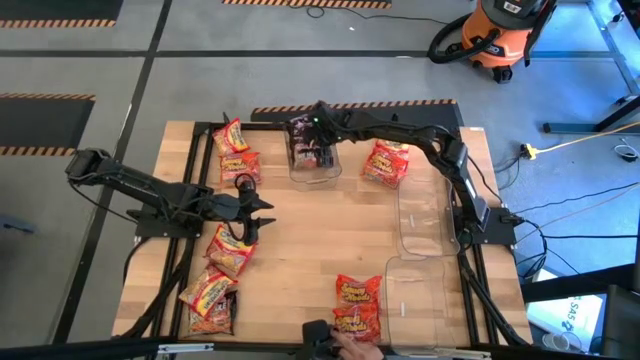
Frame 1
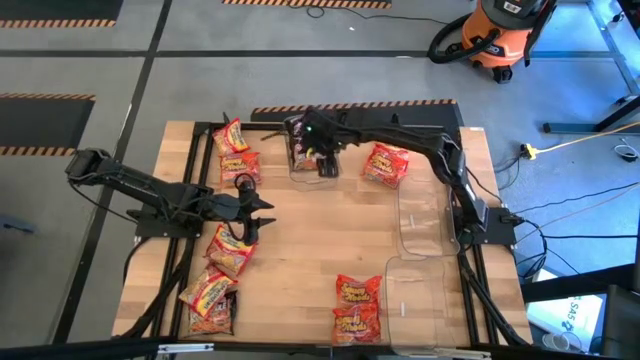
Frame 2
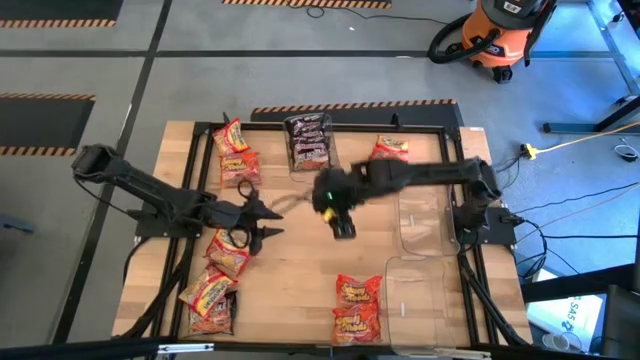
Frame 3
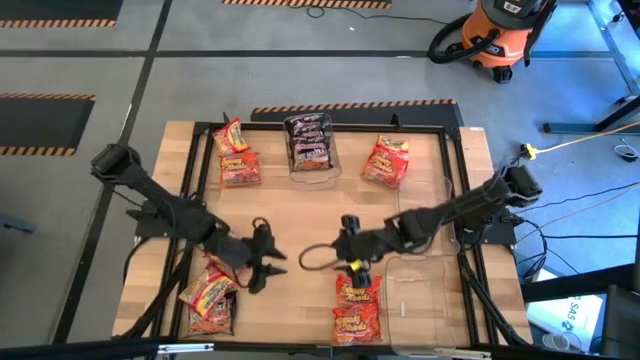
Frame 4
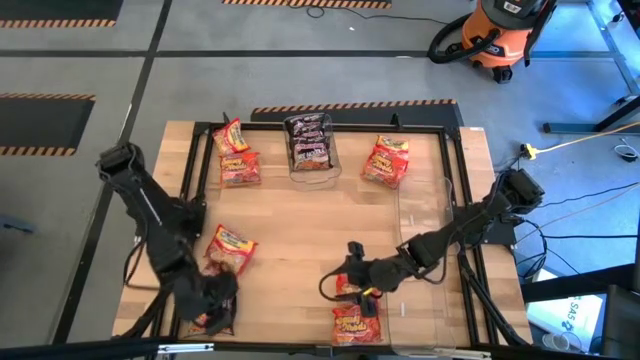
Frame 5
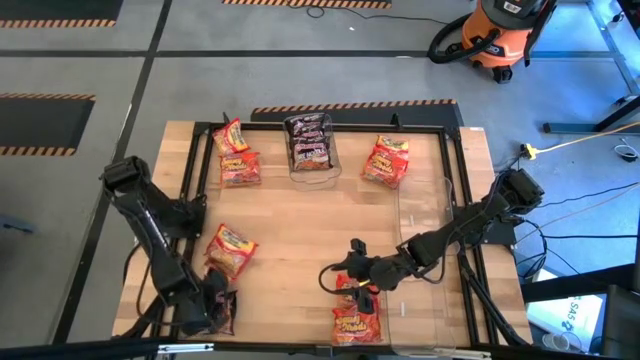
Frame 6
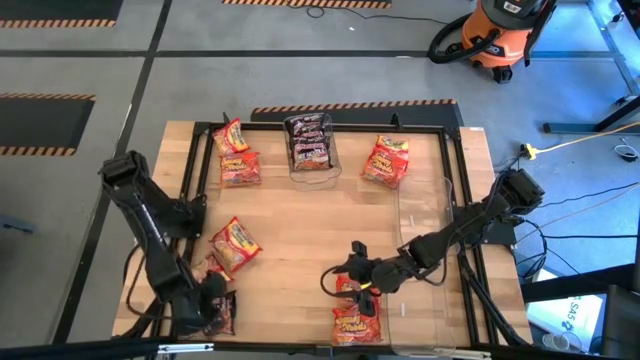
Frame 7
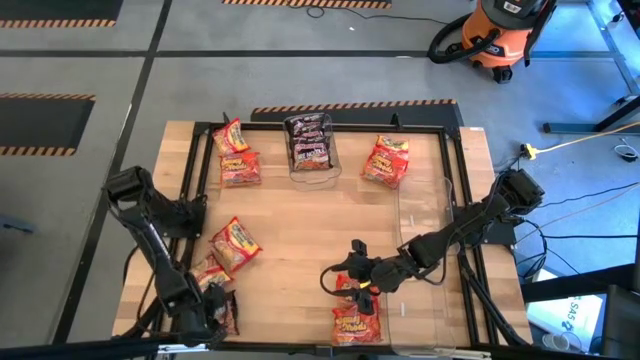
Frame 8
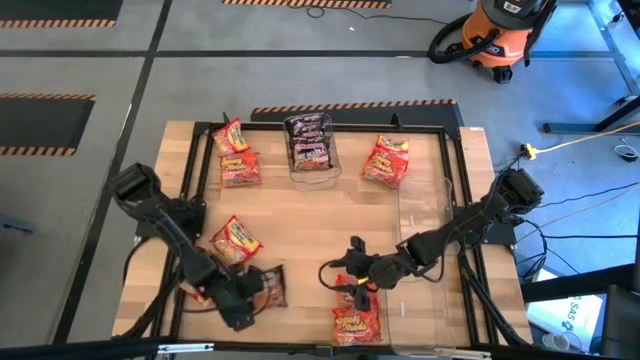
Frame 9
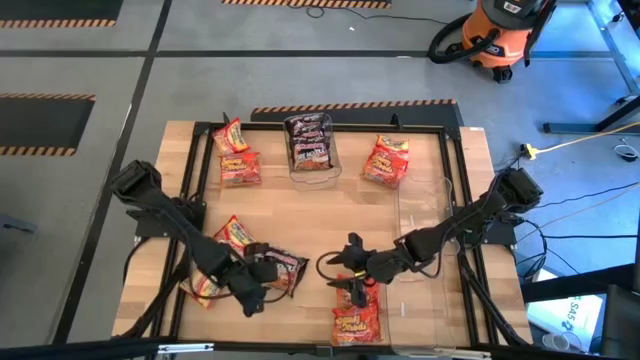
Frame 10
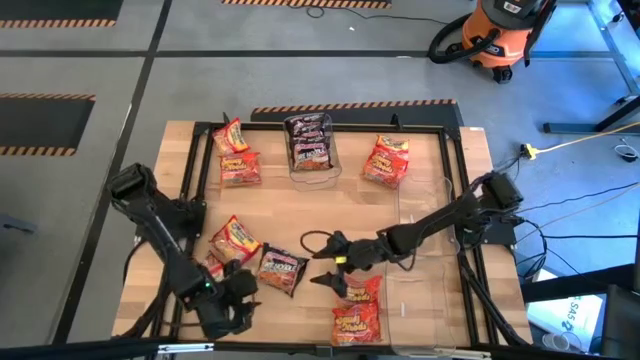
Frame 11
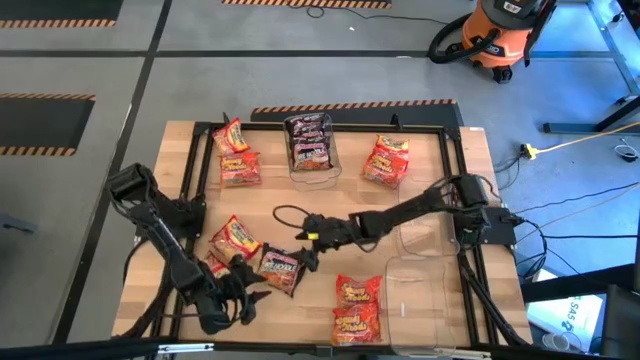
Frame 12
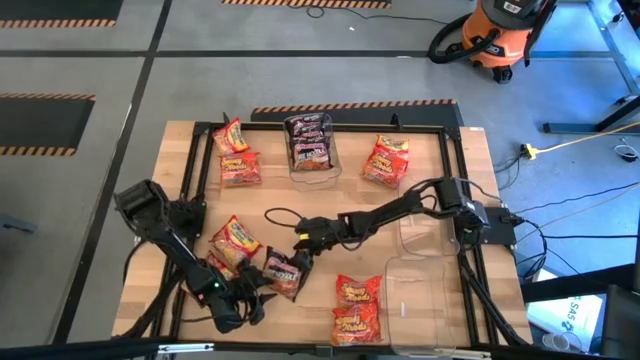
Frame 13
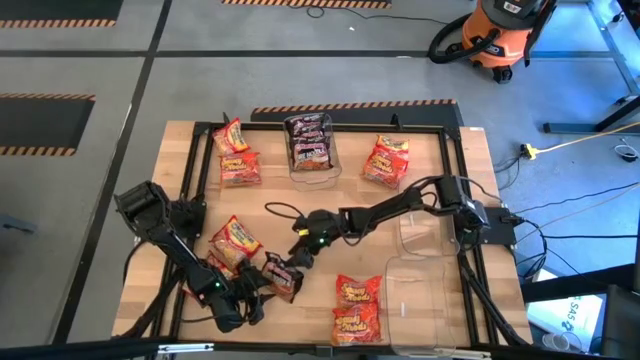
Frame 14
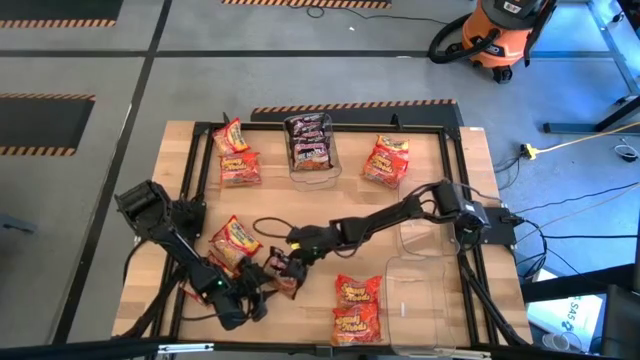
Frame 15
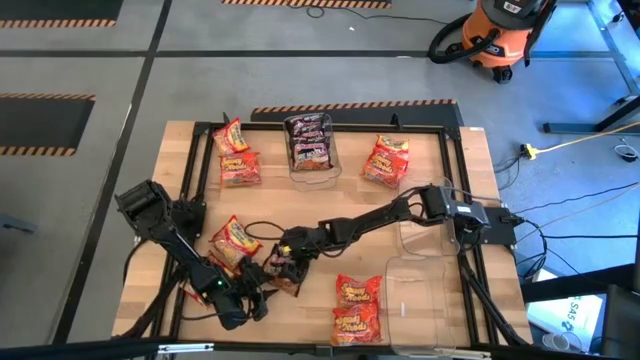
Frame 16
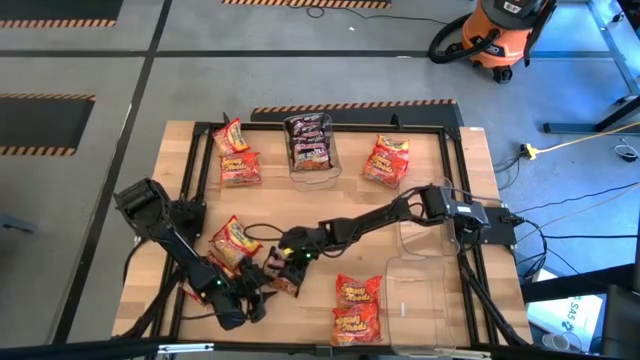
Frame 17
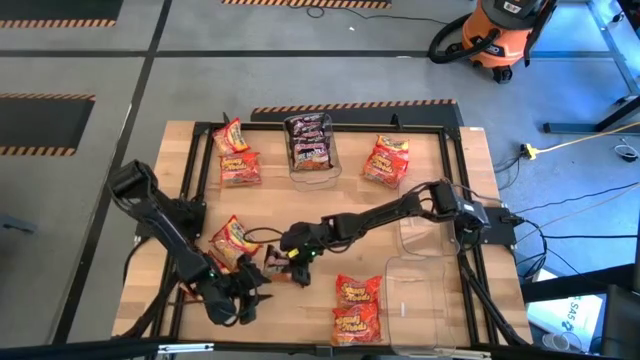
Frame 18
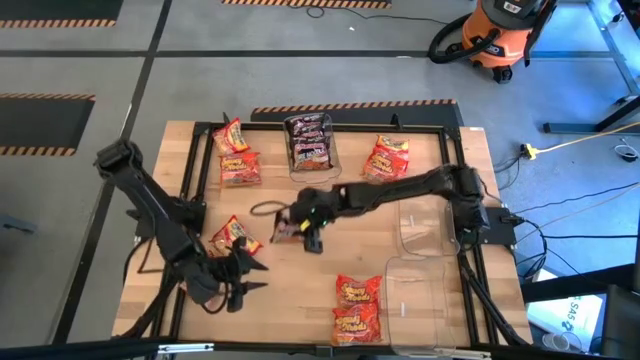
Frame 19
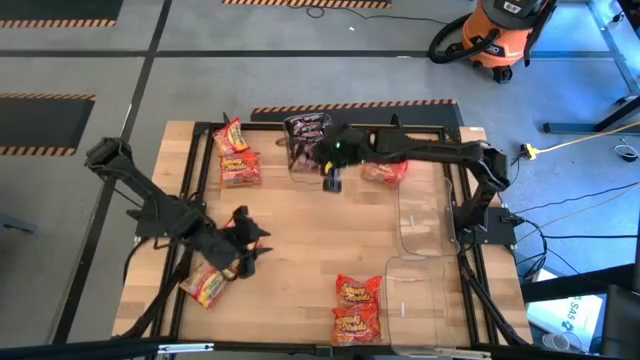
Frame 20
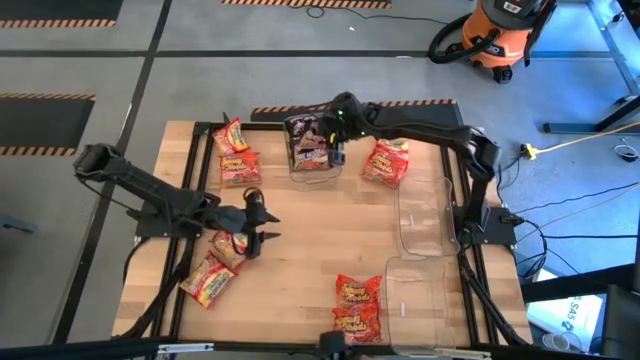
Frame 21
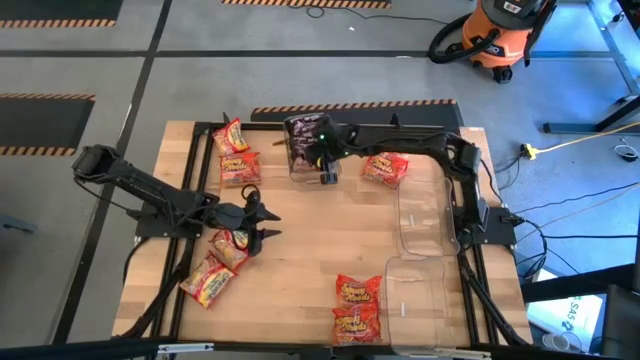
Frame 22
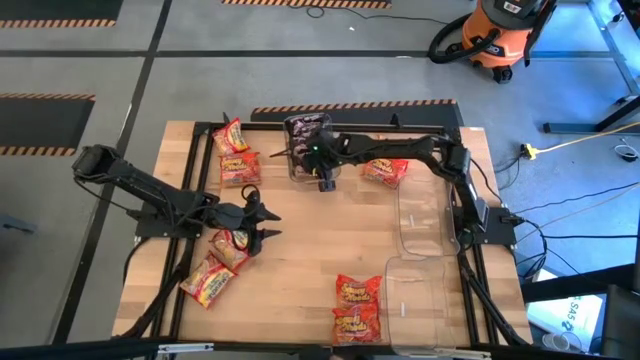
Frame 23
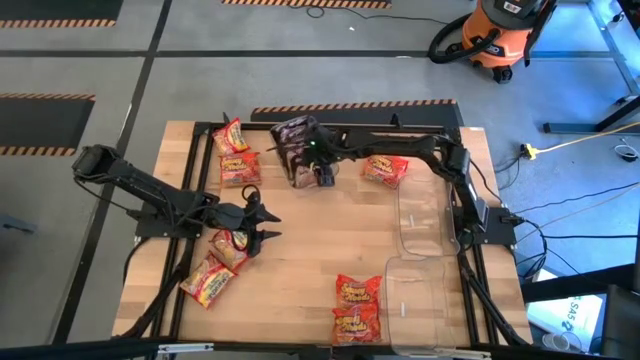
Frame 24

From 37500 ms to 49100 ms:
Task: Sort Maruchan noodles
Put the black noodle pack into the top transparent bin

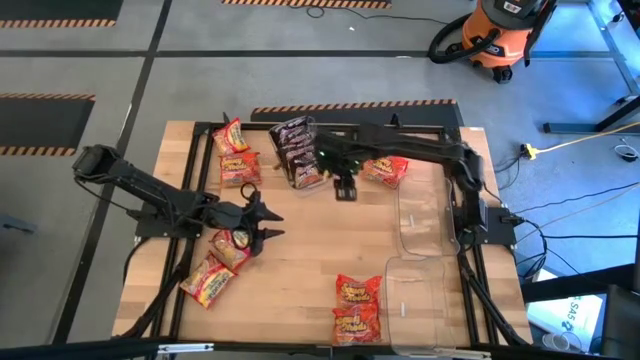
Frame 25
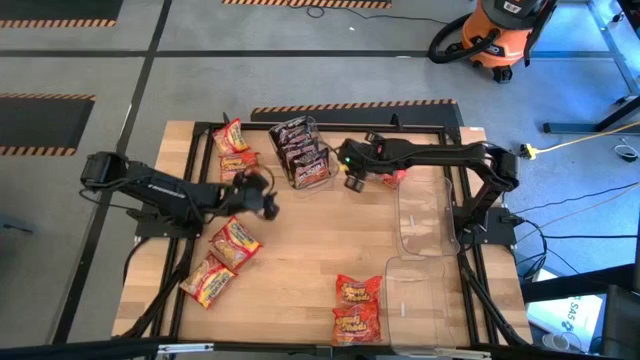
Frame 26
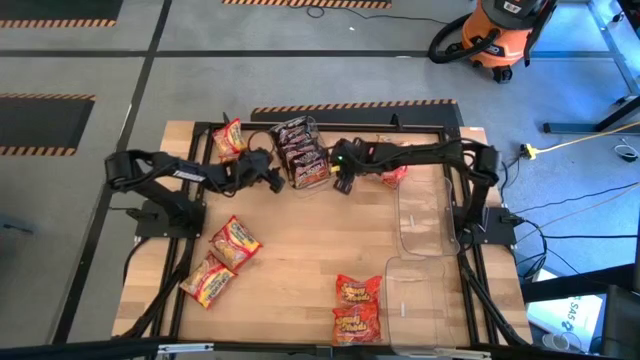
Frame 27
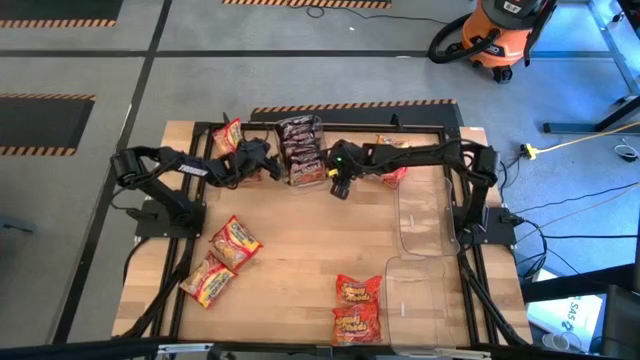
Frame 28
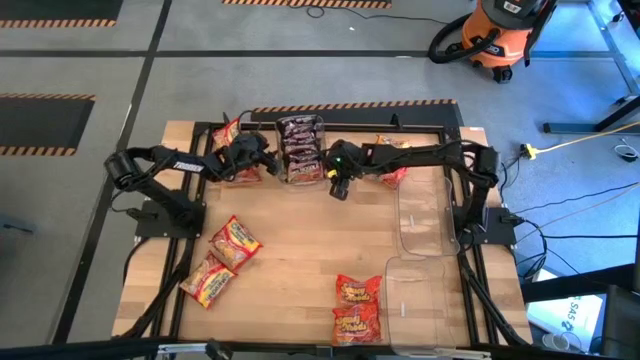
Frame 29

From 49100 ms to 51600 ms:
Adjust the top transparent bin

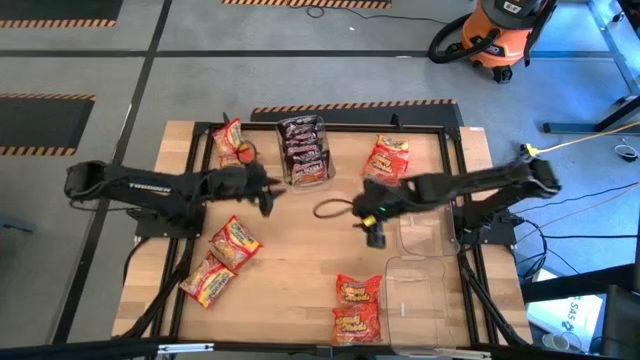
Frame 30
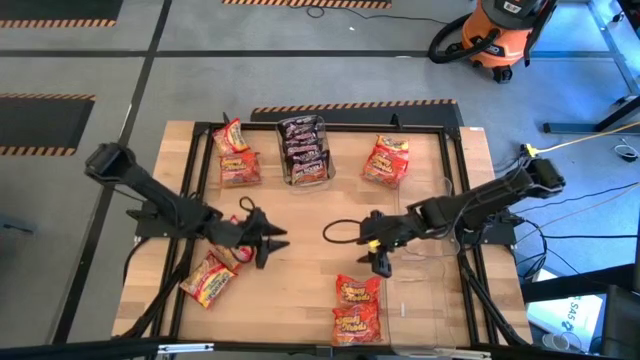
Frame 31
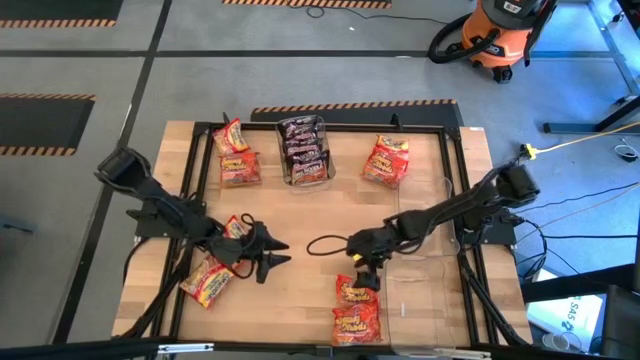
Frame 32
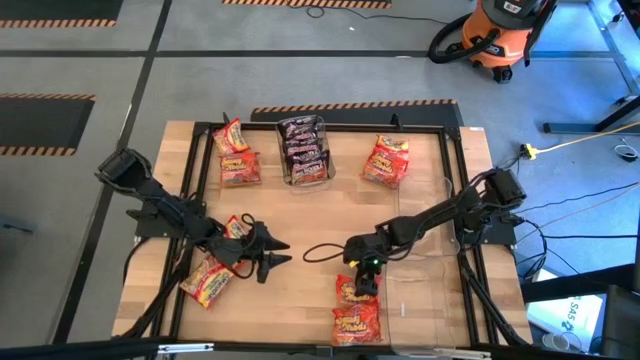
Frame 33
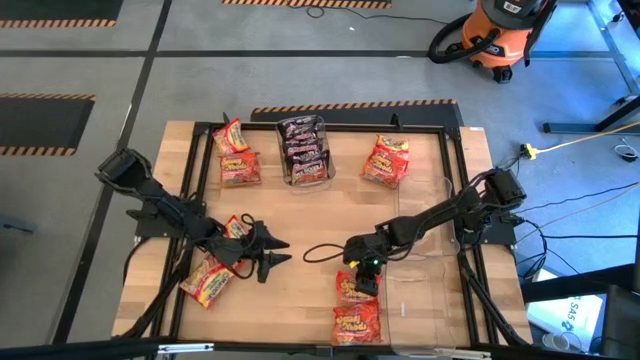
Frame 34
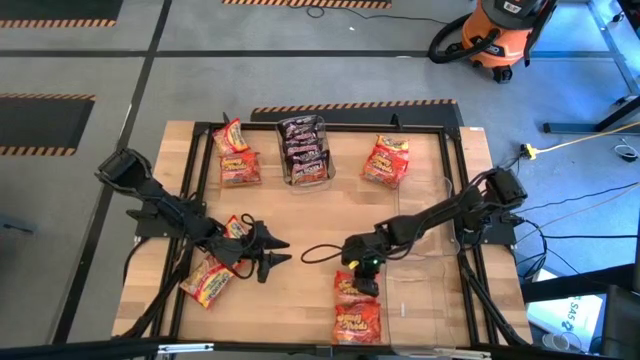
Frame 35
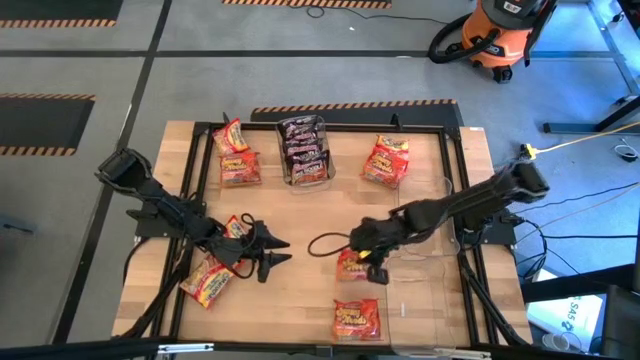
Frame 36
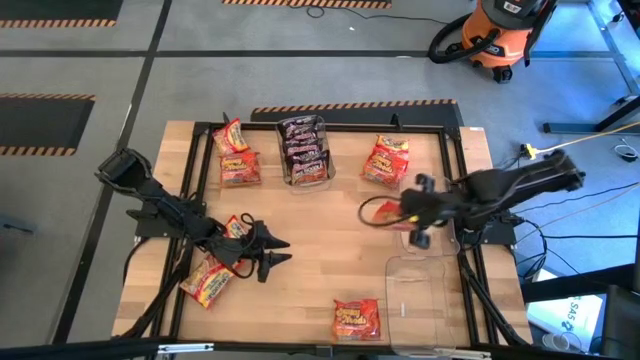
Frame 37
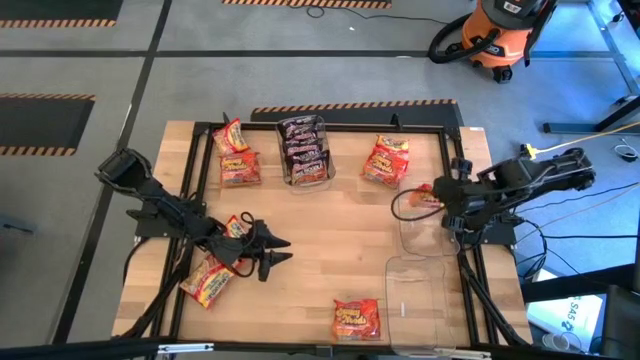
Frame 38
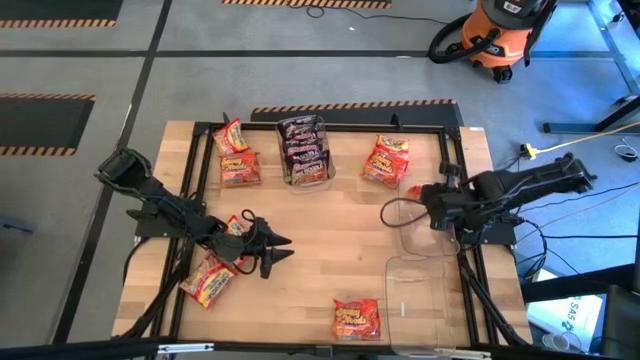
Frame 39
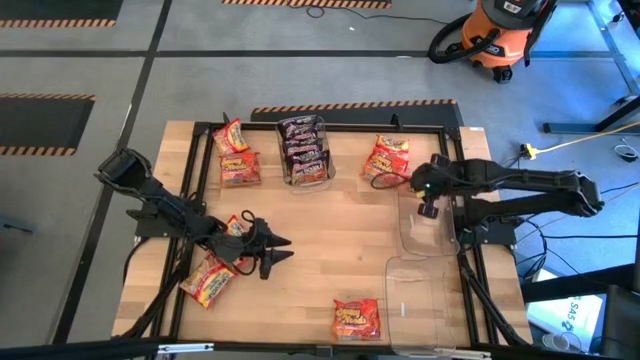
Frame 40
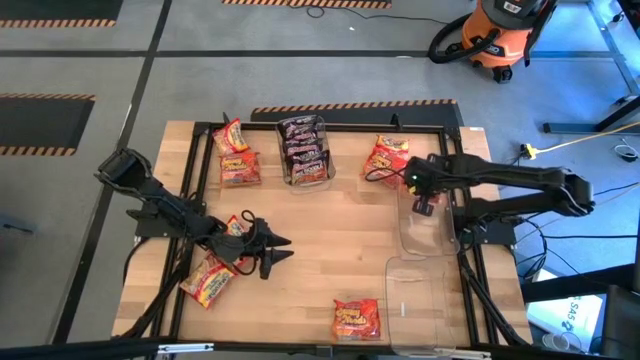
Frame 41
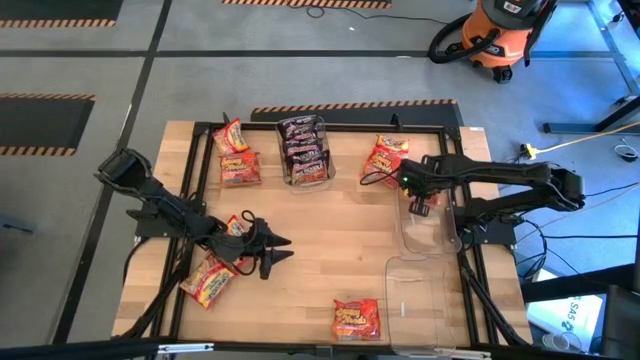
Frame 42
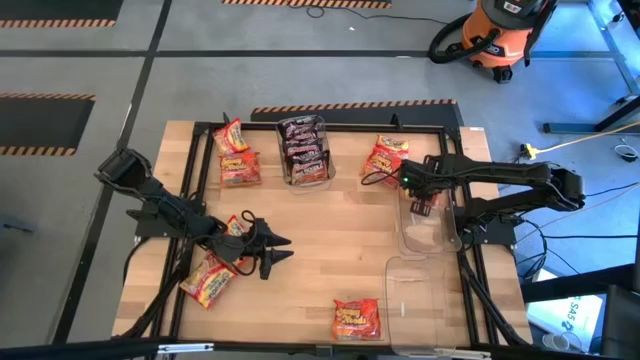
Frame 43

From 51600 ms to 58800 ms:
Put the orange noodle pack into the middle transparent bin
